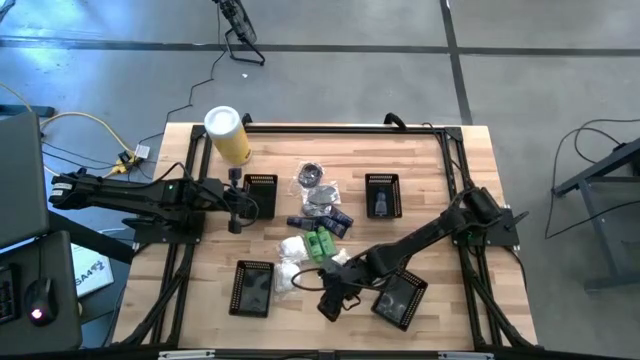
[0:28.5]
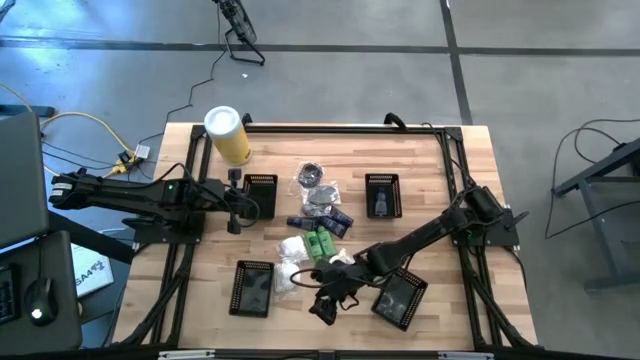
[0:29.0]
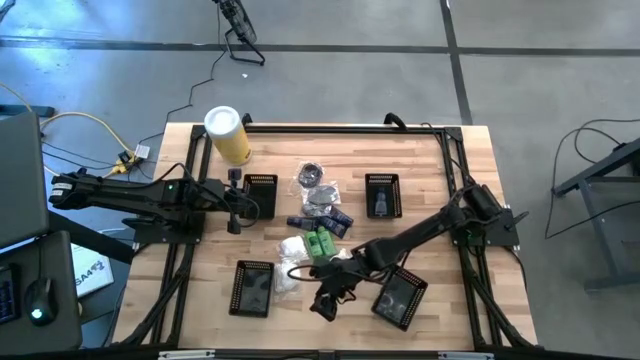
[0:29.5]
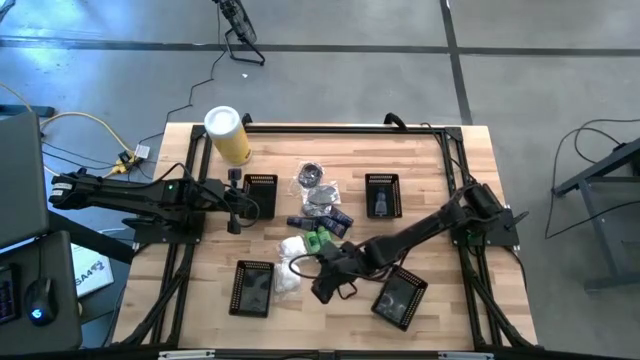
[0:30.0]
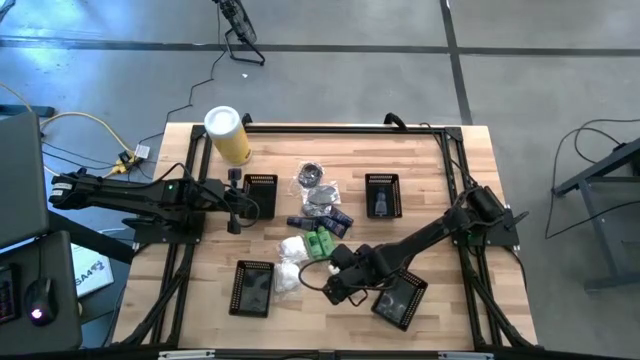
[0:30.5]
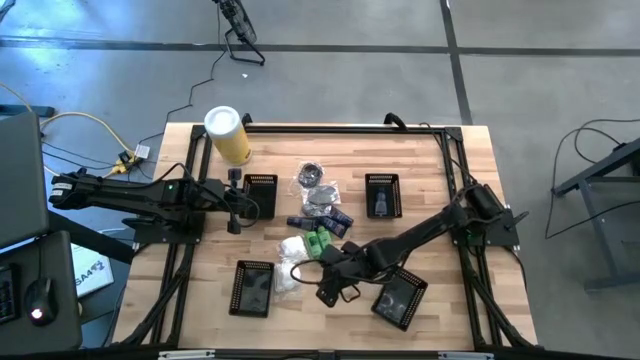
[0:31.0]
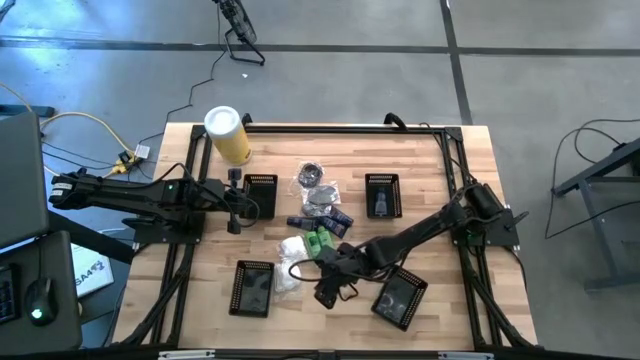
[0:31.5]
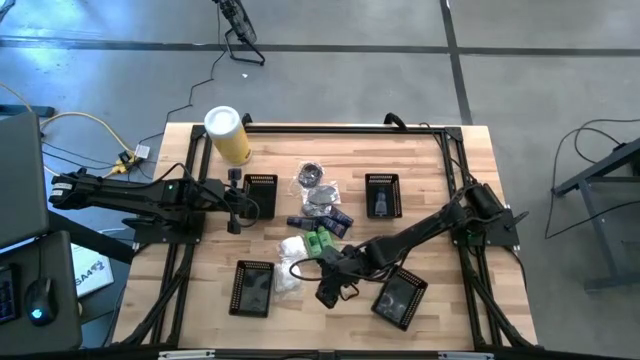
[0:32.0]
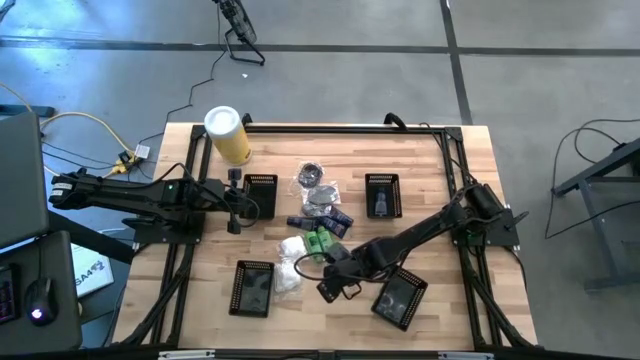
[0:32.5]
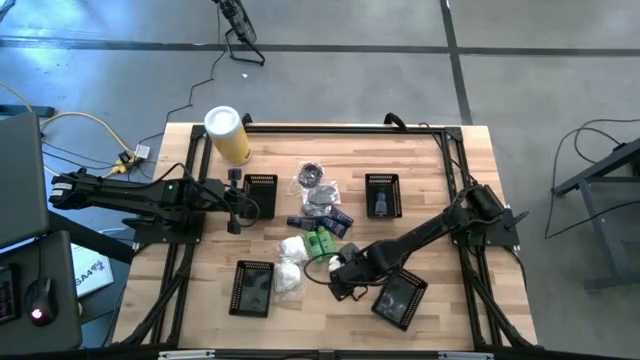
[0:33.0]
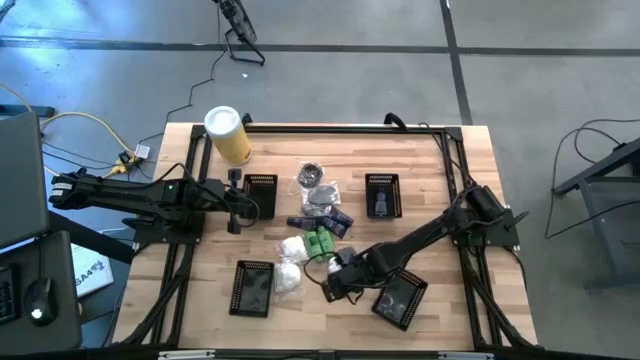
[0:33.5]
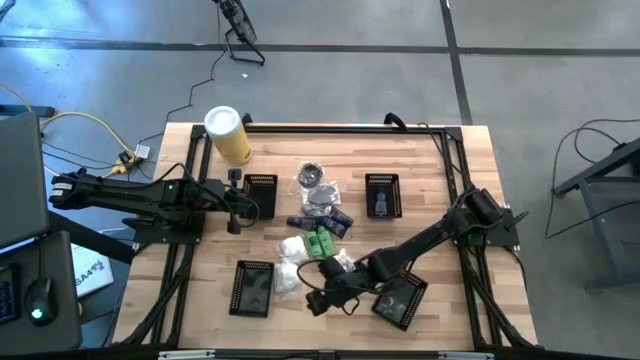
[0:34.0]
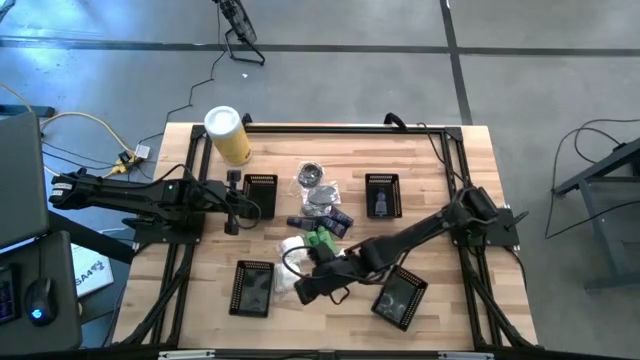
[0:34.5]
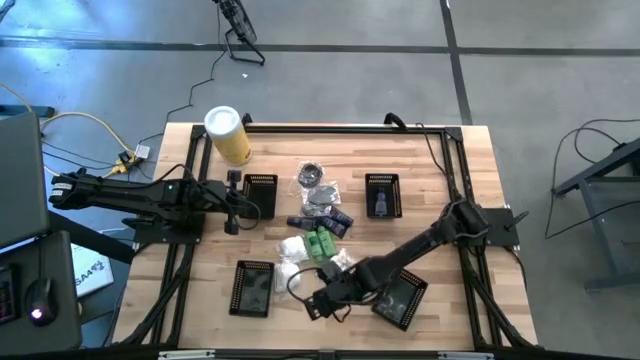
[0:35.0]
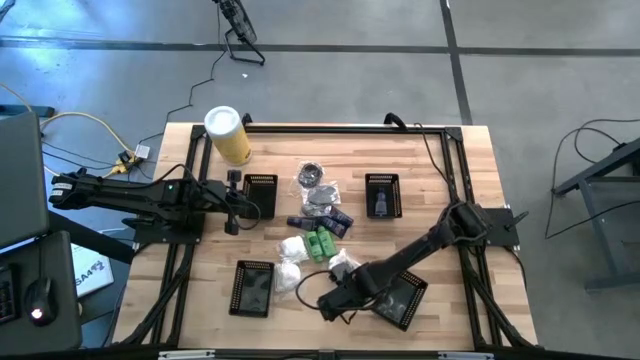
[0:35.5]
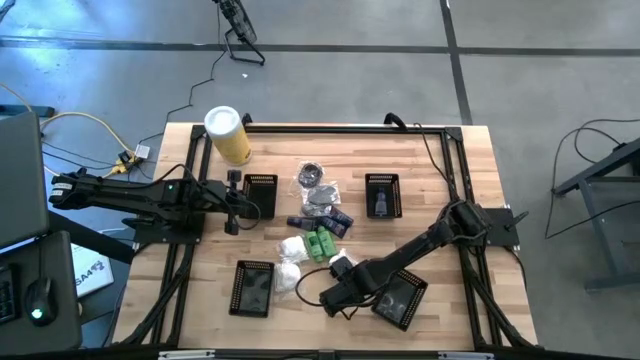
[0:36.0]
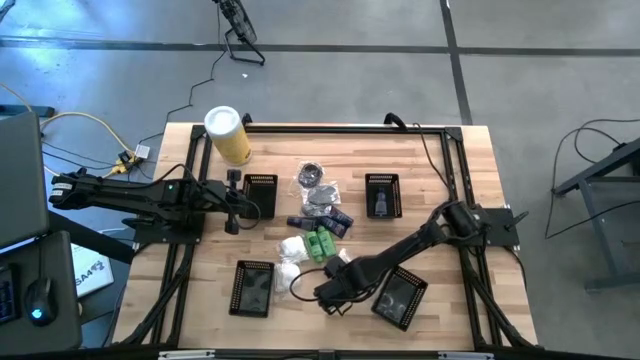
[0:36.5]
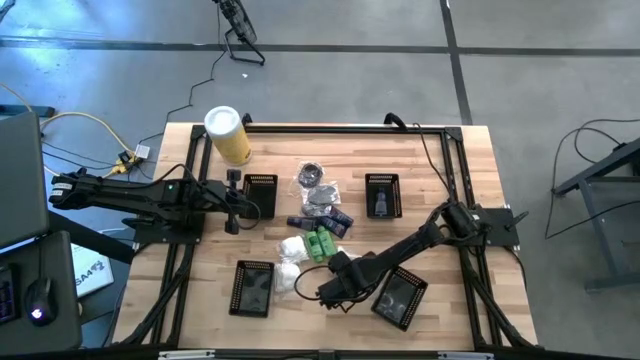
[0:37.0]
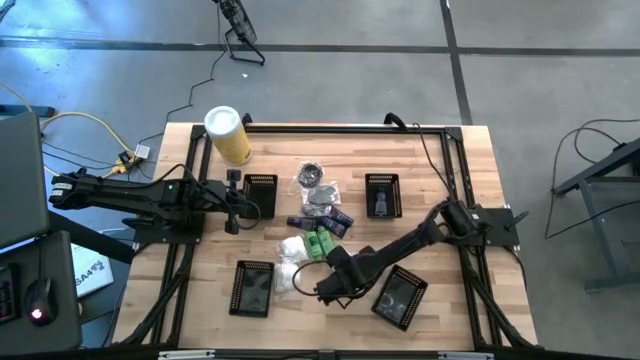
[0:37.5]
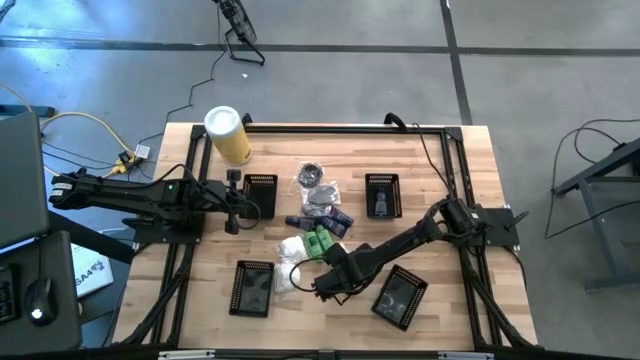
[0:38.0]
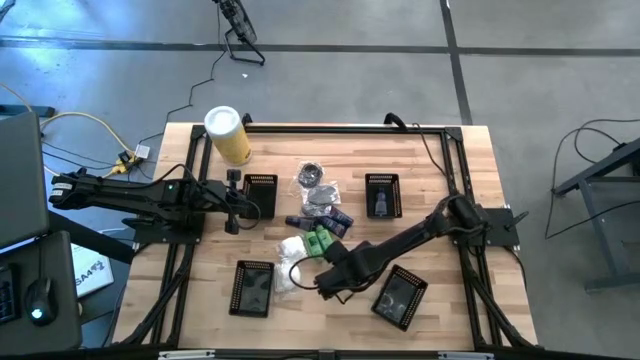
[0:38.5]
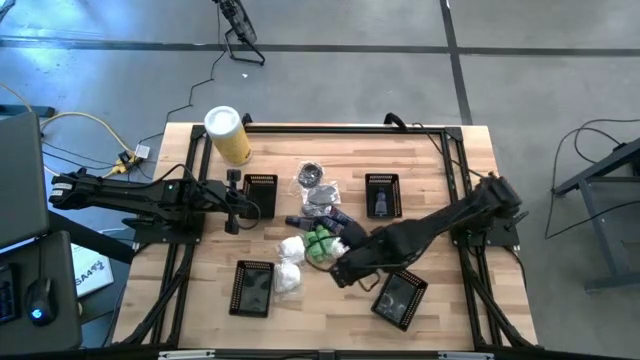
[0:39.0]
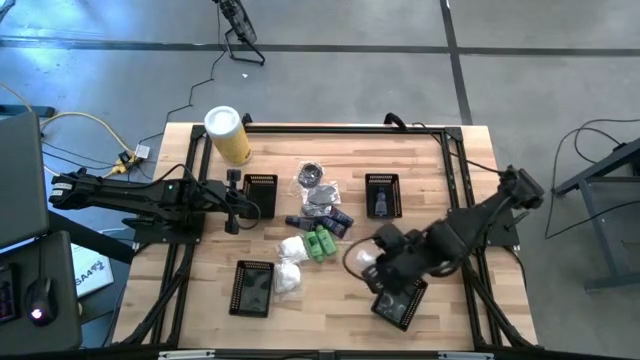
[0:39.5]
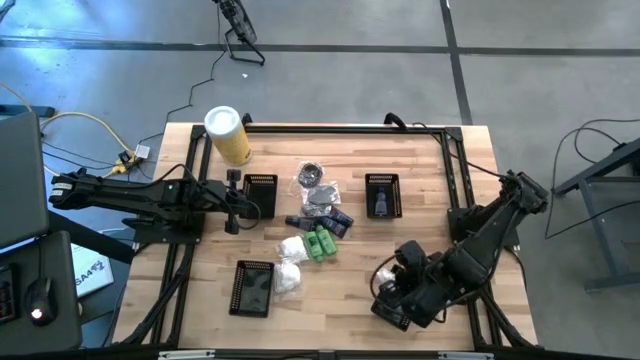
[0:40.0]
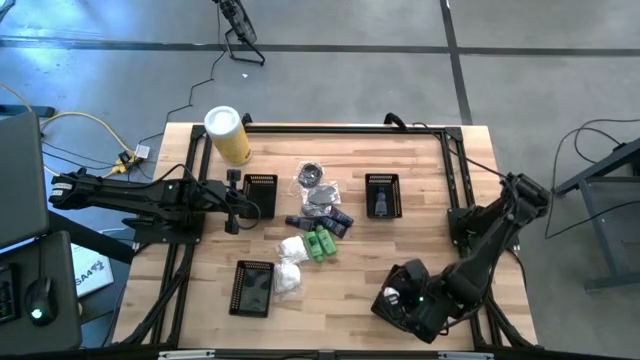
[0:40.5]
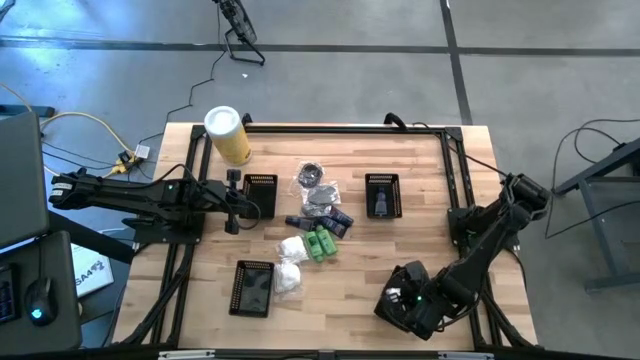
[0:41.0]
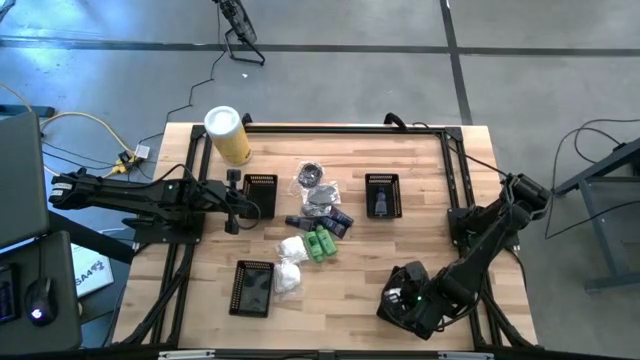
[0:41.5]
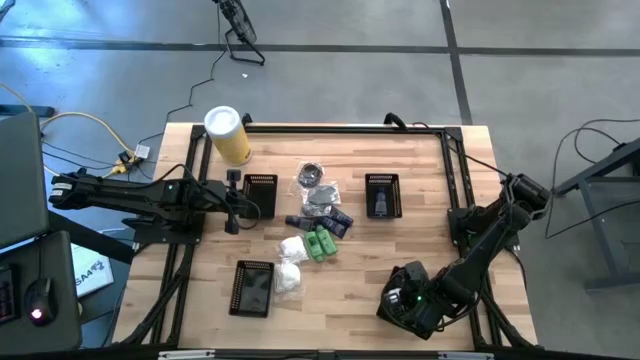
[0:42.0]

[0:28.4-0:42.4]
Task: Pick & Place Travel size toiletries
Put the white cotton pack into the bottom right black basket

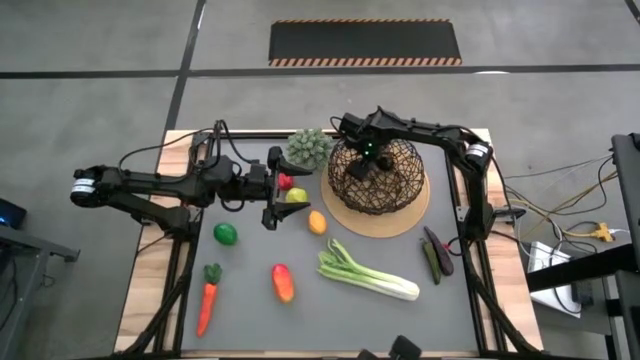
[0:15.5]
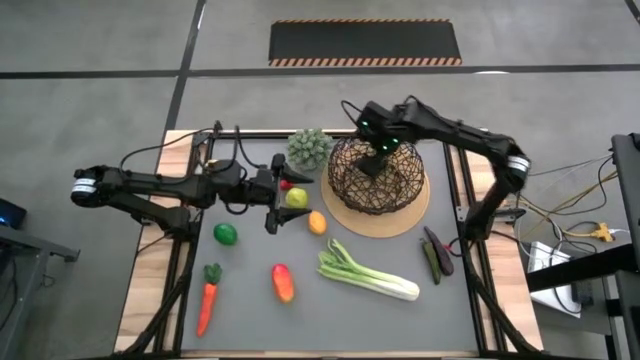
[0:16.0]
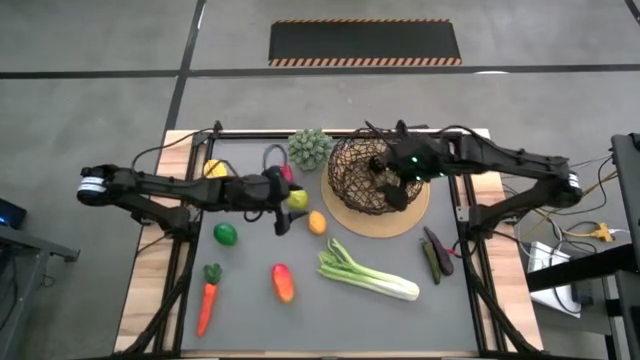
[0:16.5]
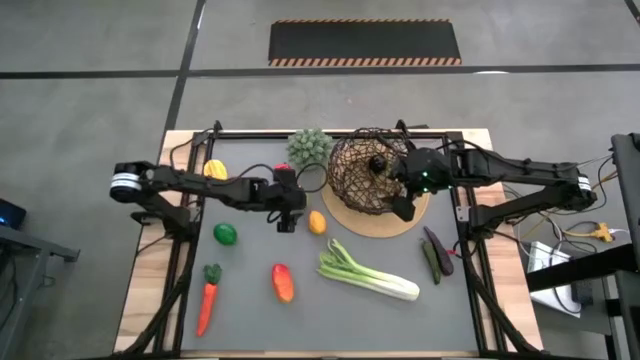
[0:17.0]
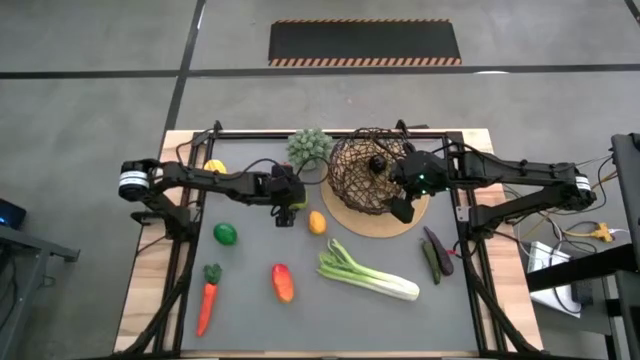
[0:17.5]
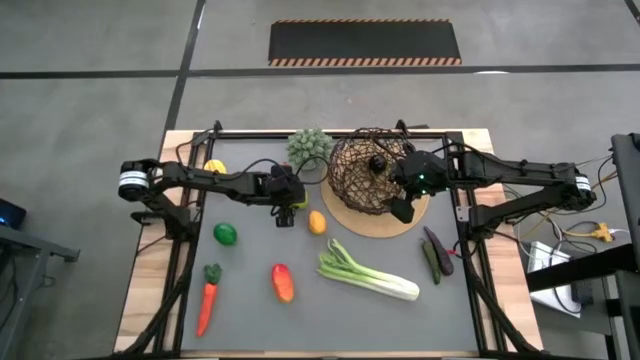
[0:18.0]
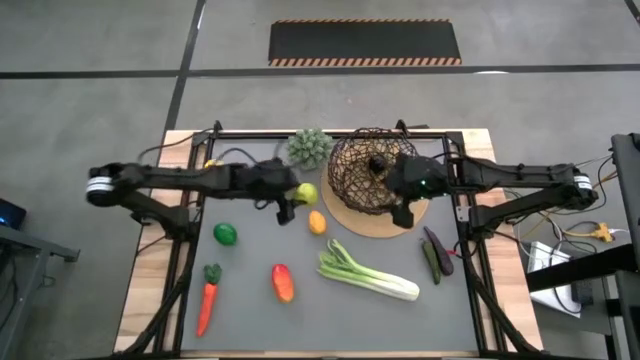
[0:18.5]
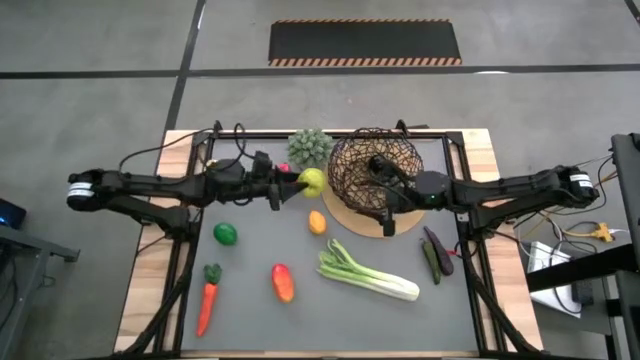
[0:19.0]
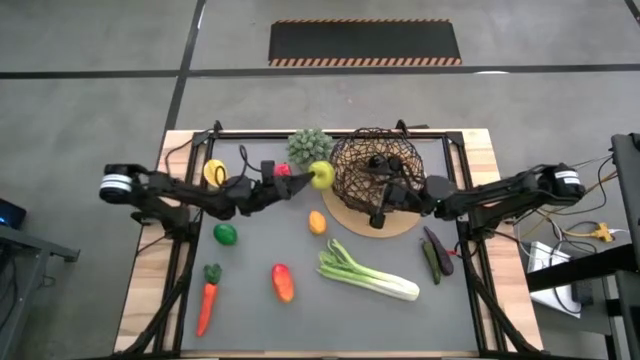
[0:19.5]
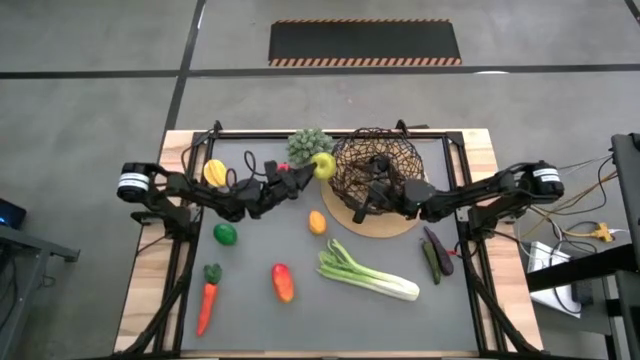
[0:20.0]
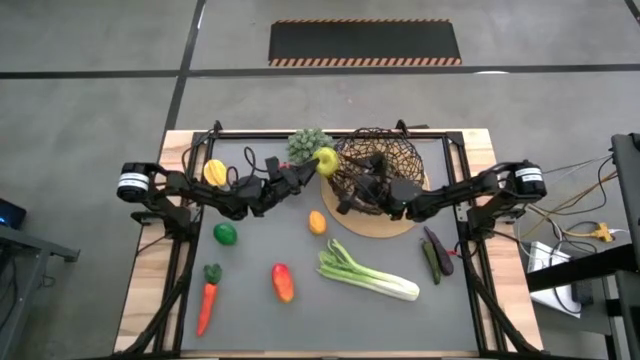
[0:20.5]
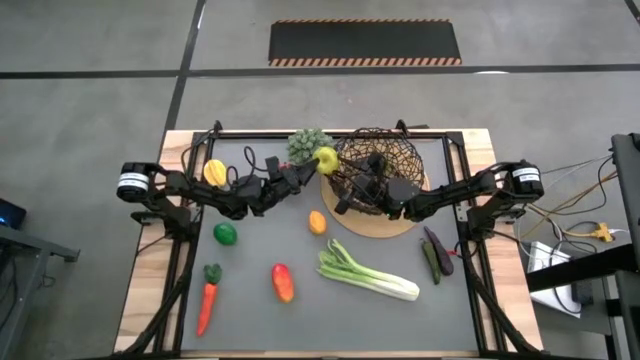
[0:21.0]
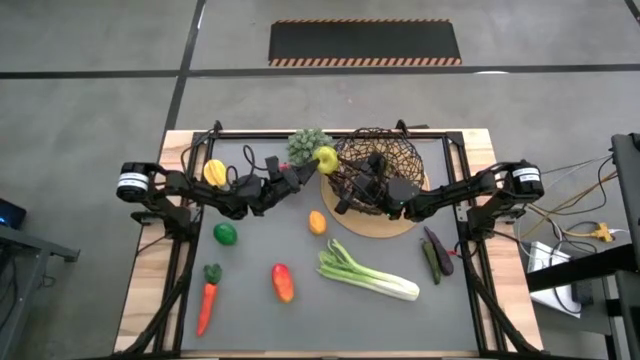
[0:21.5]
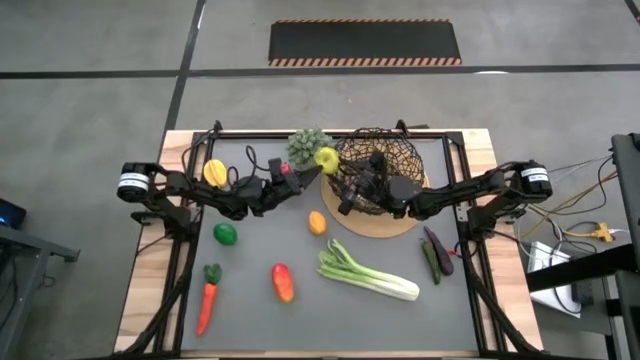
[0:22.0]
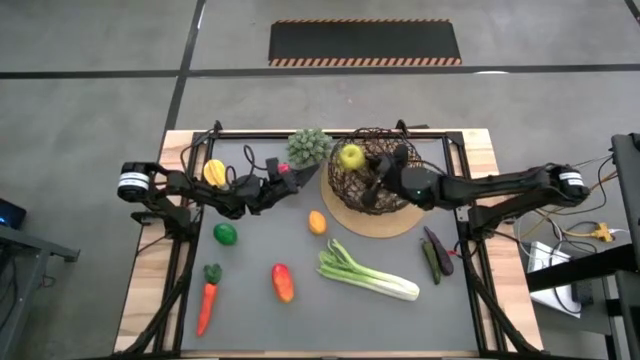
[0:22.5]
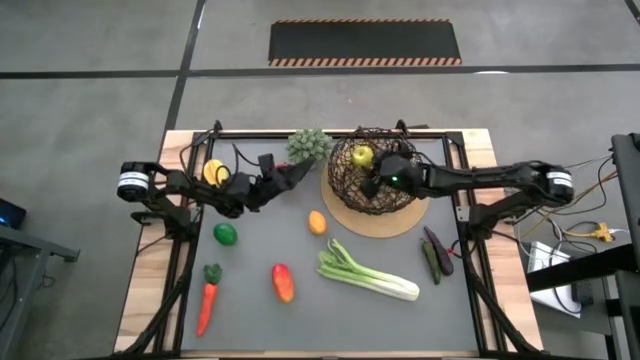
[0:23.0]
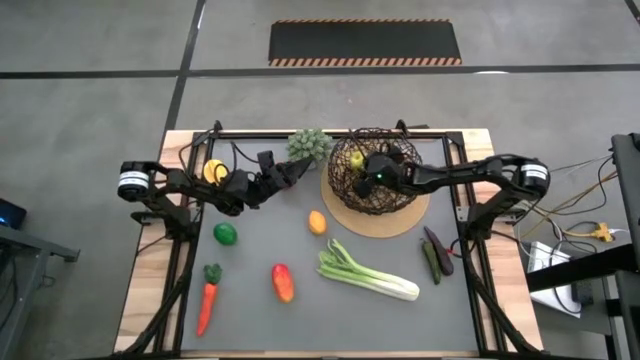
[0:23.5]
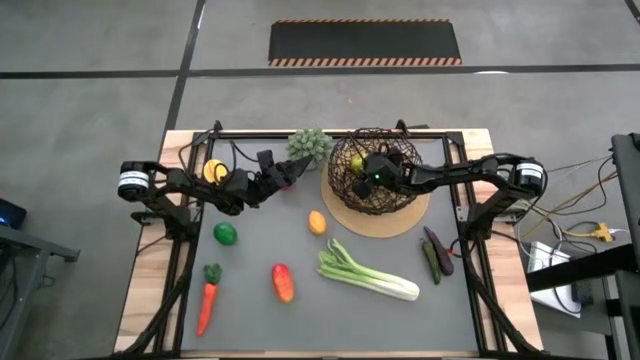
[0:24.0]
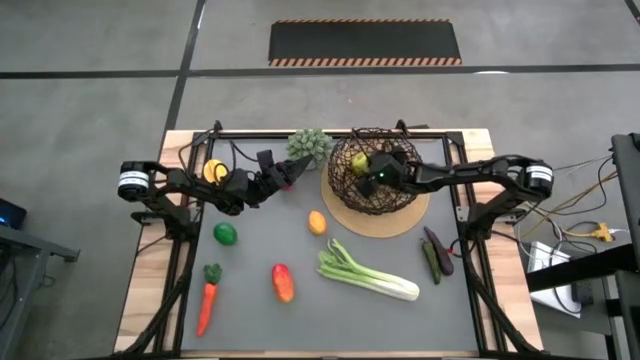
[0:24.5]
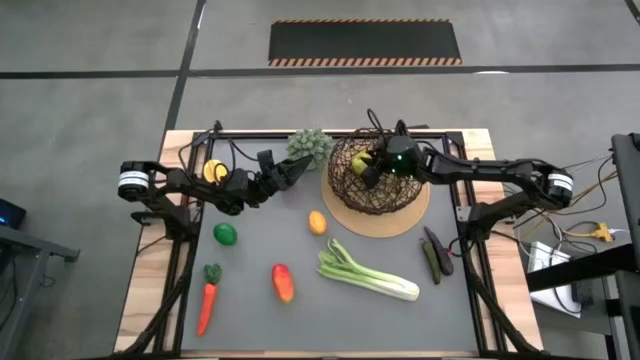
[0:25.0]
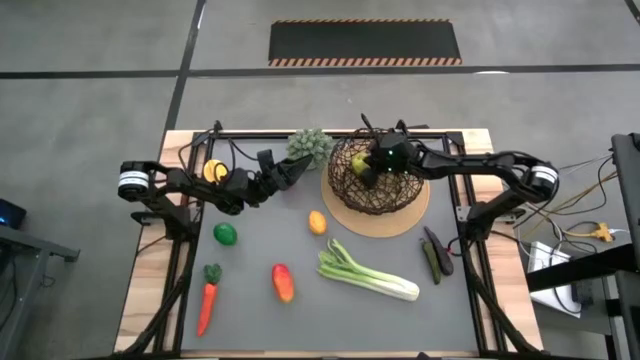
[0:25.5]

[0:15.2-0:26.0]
Task: Build produce basket
Put the green apple into the black wire basket
